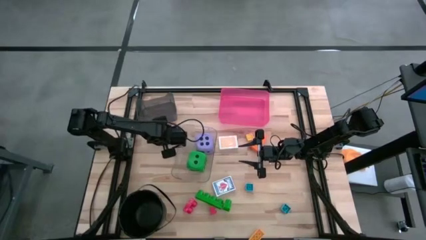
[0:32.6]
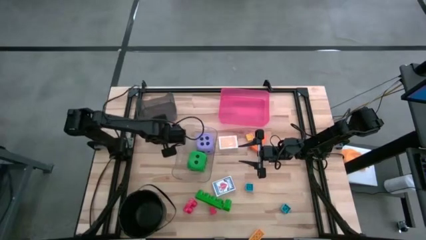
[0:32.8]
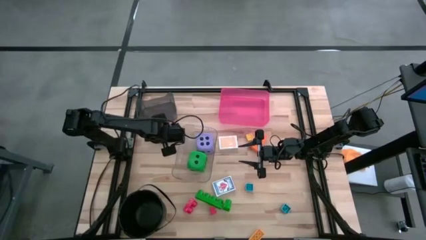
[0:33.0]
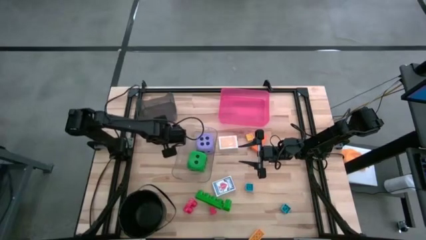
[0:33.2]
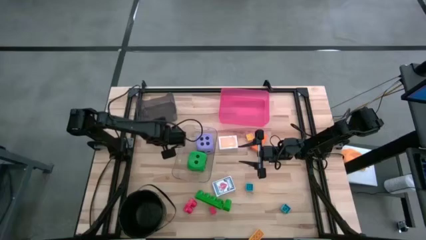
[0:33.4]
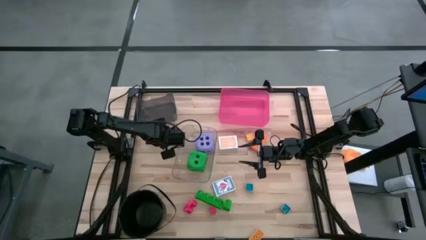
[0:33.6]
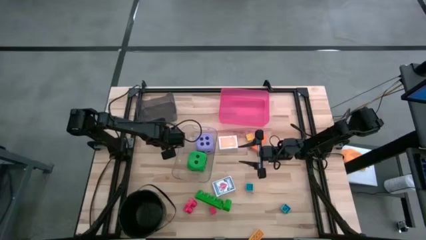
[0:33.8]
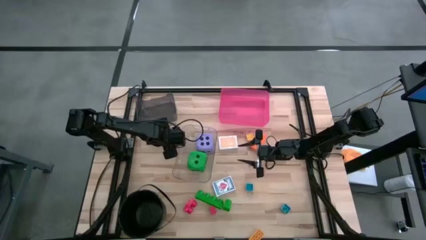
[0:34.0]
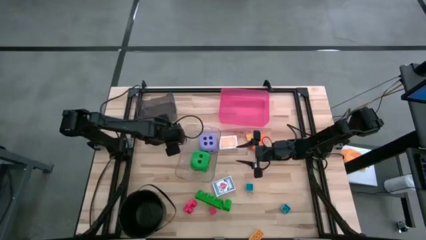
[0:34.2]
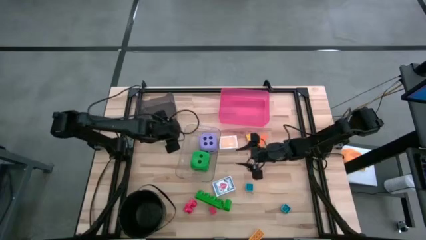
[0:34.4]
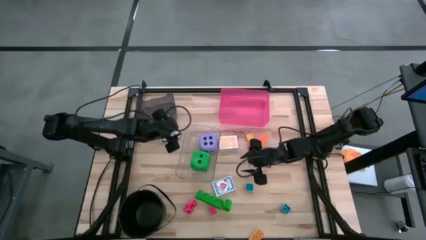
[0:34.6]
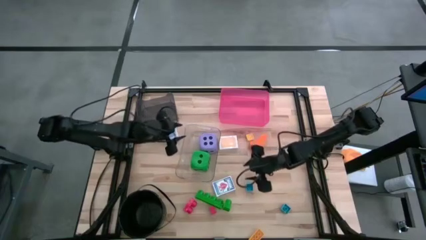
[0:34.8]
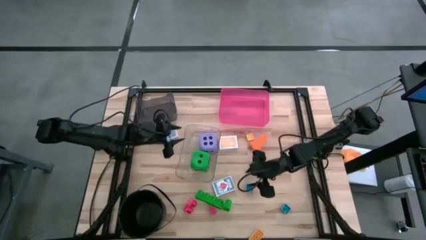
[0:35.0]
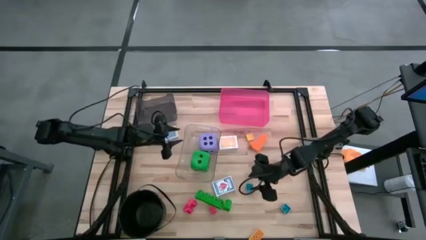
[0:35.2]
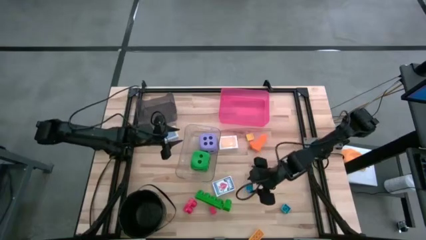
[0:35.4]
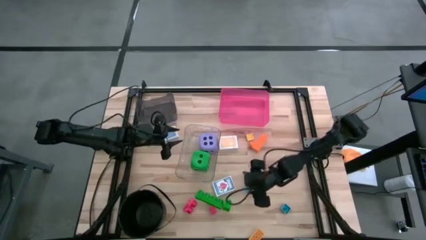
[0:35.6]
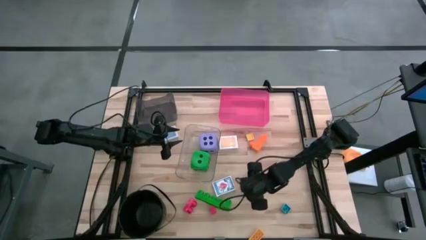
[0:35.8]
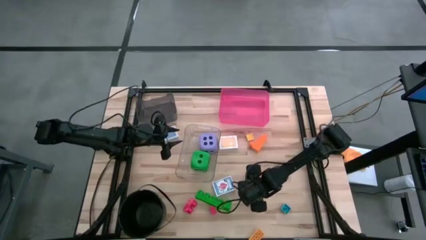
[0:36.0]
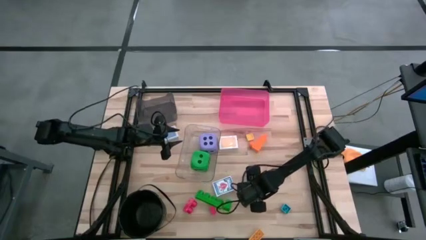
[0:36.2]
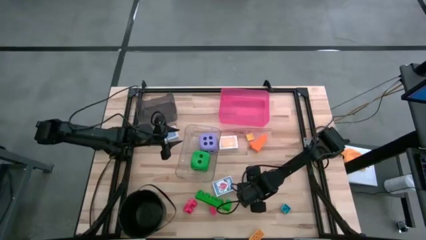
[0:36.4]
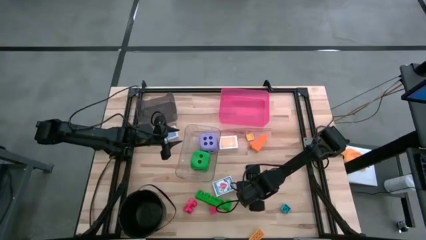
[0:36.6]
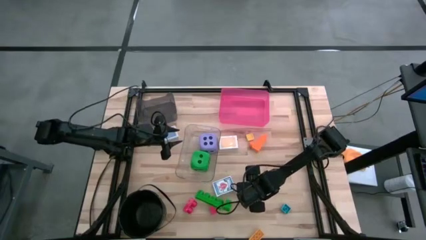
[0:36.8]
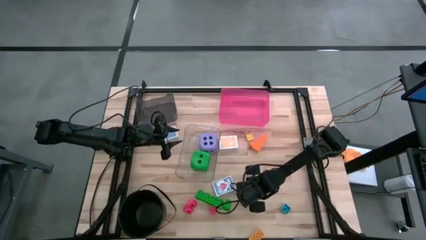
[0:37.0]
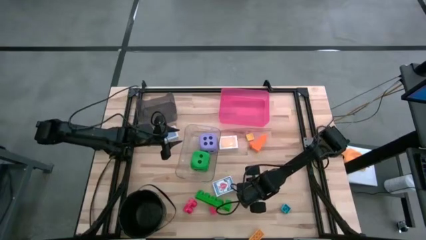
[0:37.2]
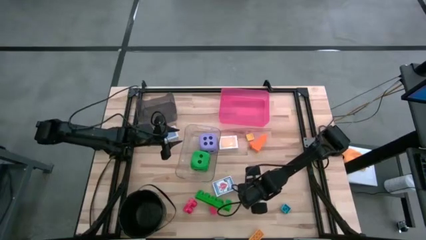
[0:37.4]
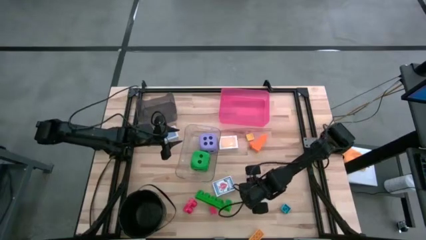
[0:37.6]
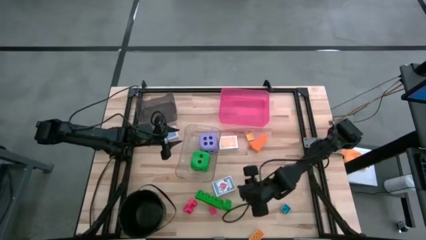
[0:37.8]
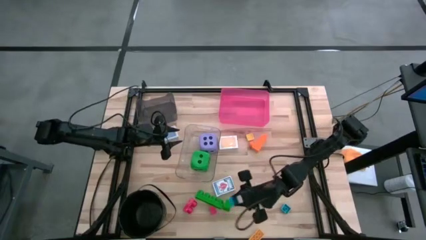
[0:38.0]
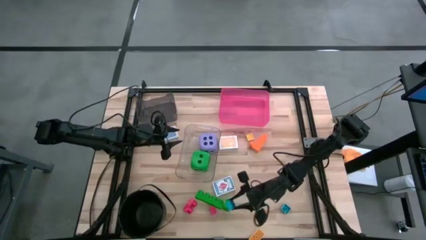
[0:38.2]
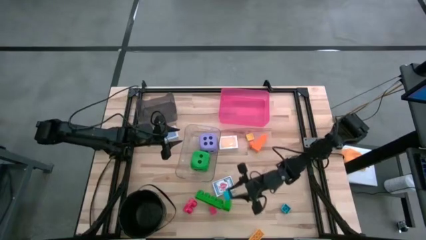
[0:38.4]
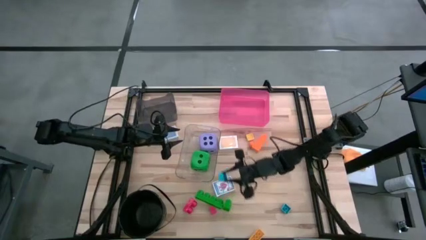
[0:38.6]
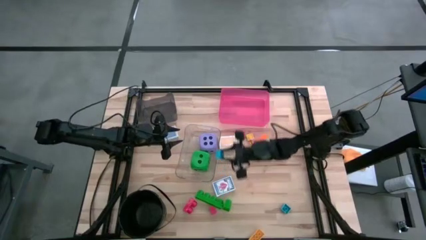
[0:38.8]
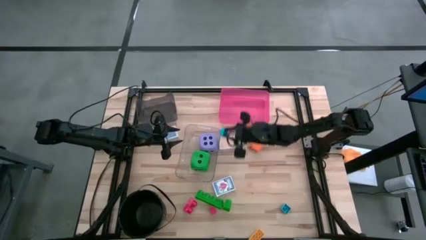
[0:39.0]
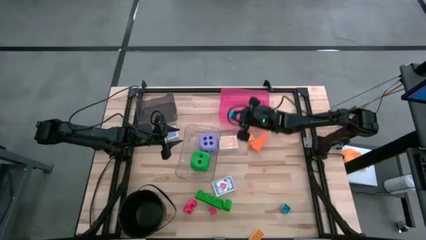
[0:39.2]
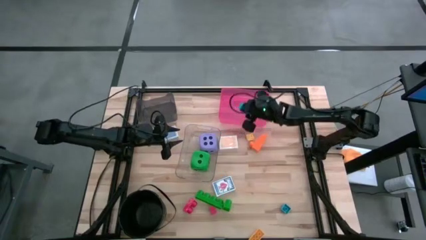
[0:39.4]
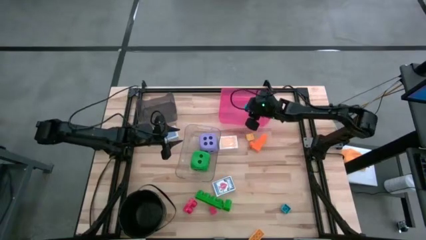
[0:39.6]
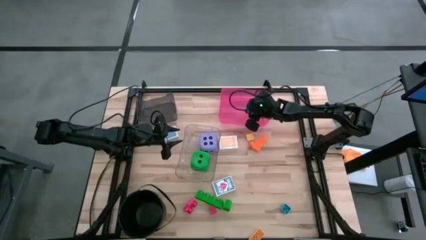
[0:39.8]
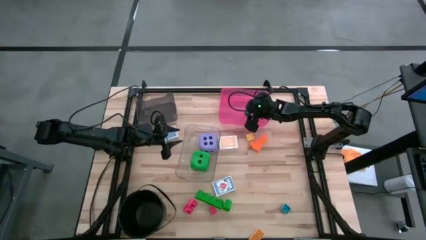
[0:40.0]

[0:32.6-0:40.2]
Task: Pick & Place Toys
Put the left blue game piece into the pink bin

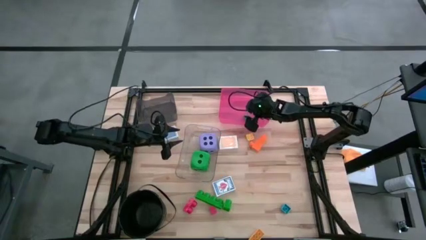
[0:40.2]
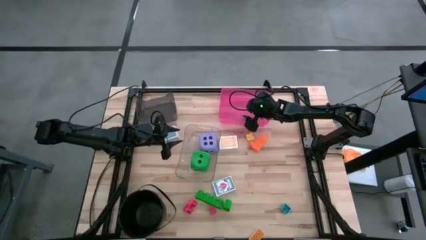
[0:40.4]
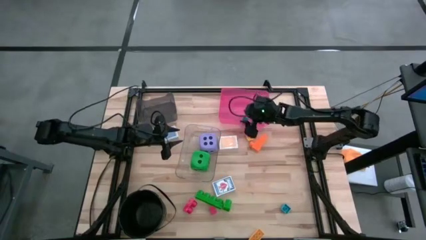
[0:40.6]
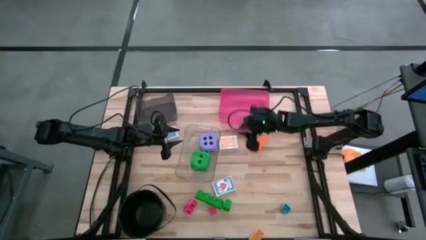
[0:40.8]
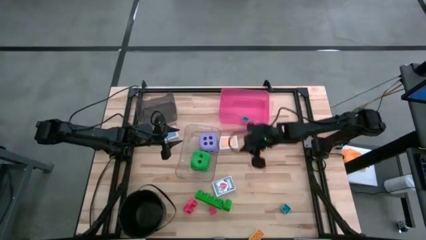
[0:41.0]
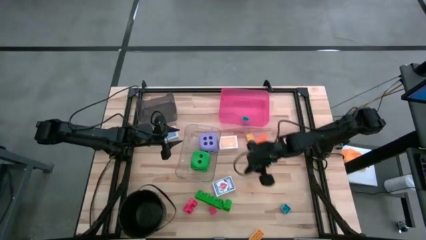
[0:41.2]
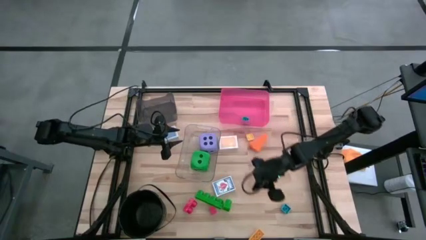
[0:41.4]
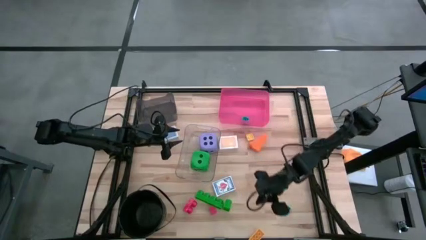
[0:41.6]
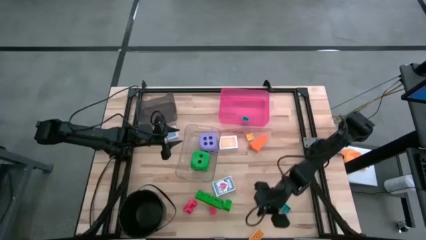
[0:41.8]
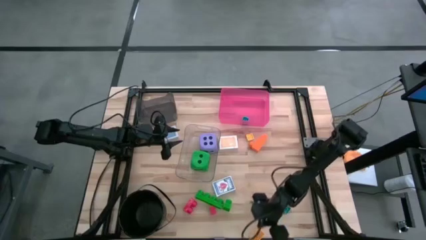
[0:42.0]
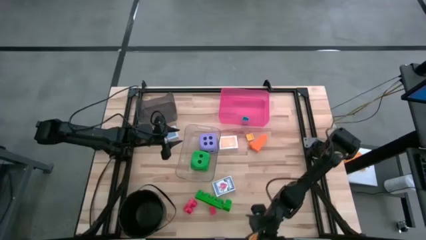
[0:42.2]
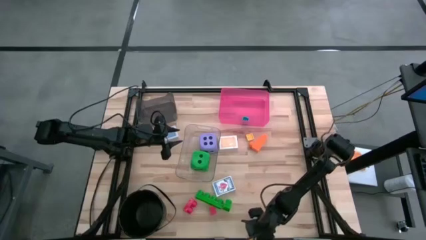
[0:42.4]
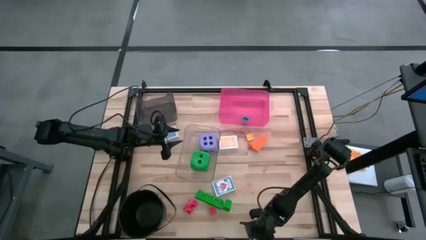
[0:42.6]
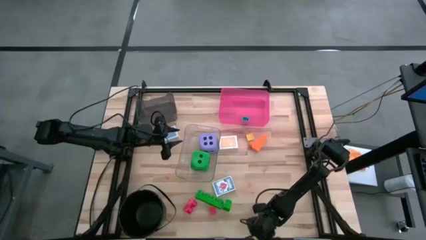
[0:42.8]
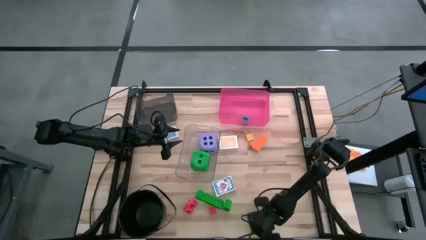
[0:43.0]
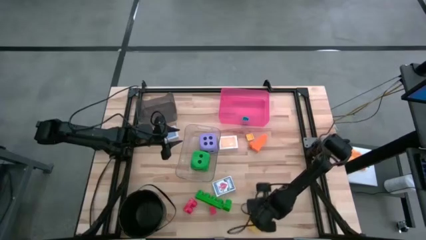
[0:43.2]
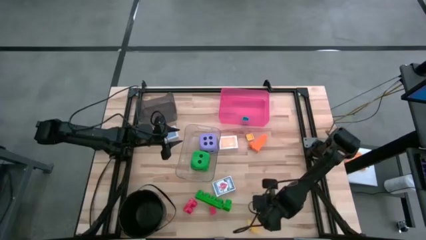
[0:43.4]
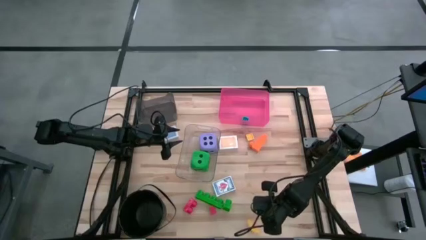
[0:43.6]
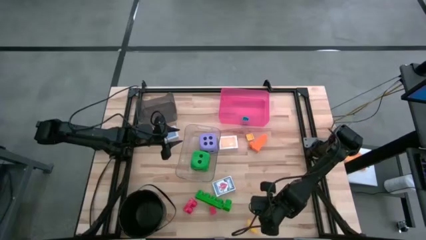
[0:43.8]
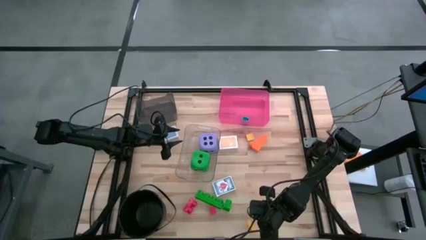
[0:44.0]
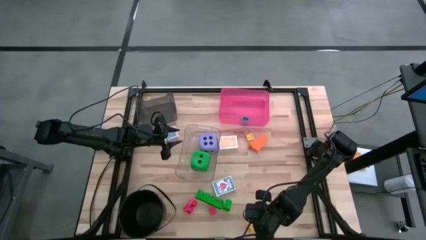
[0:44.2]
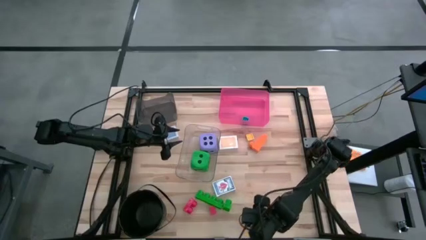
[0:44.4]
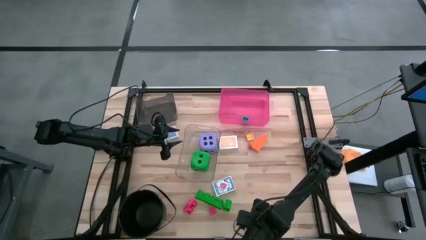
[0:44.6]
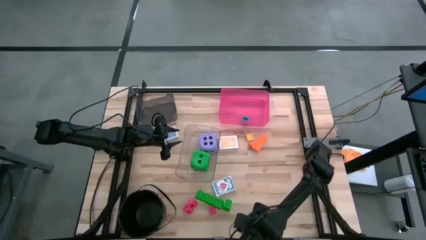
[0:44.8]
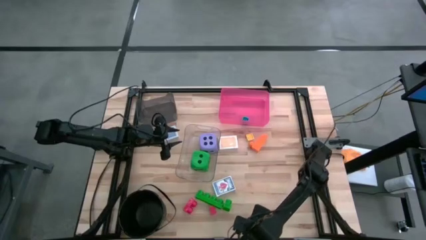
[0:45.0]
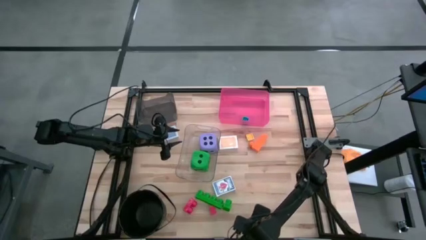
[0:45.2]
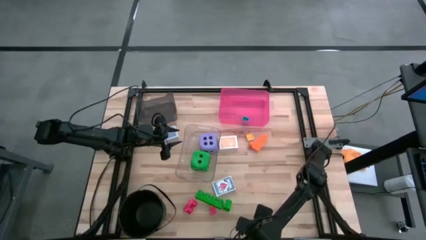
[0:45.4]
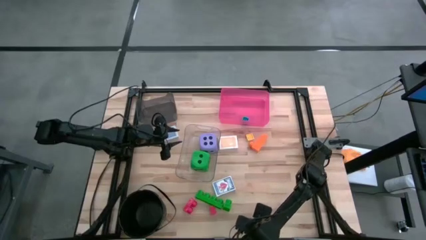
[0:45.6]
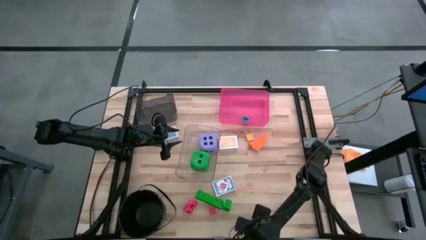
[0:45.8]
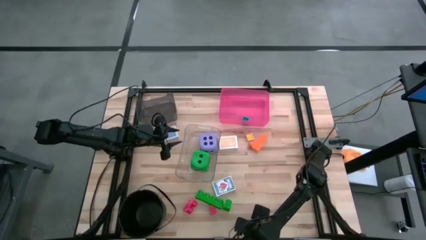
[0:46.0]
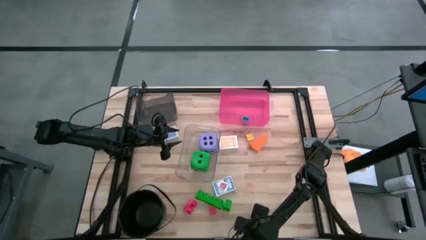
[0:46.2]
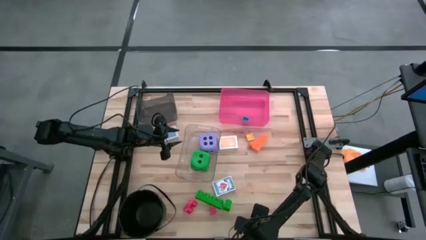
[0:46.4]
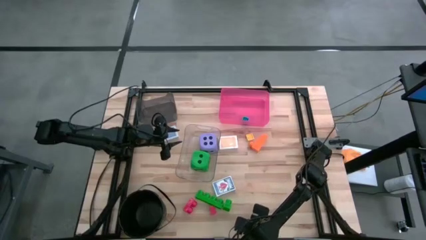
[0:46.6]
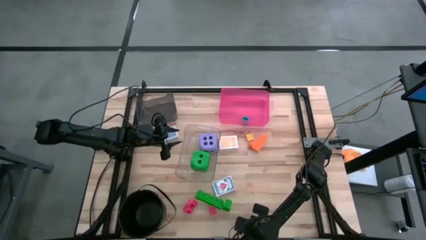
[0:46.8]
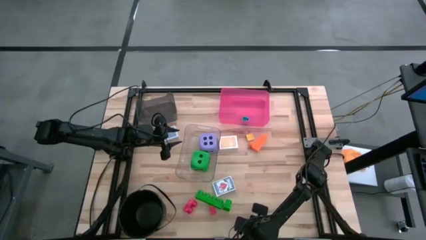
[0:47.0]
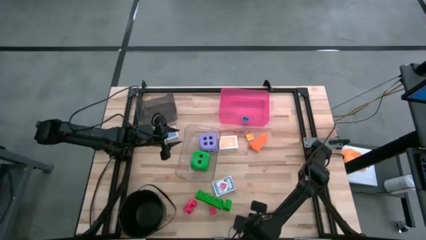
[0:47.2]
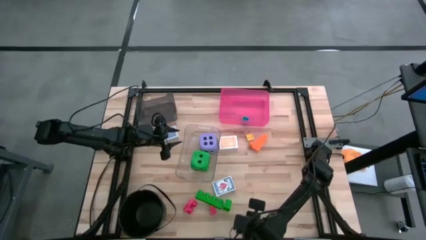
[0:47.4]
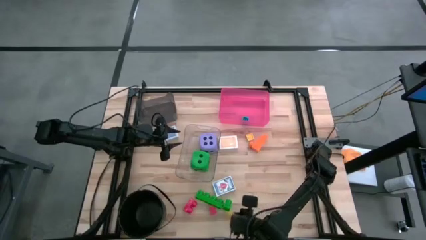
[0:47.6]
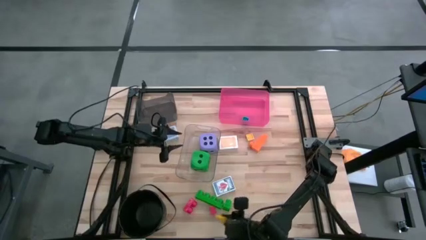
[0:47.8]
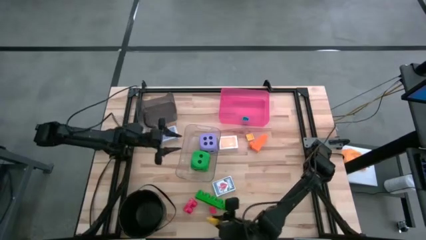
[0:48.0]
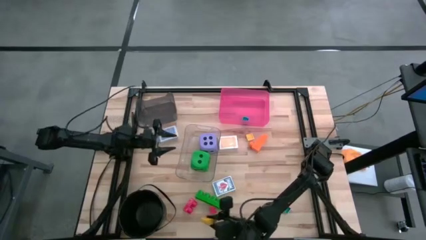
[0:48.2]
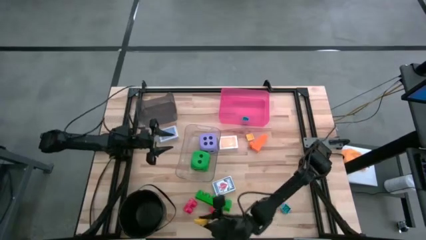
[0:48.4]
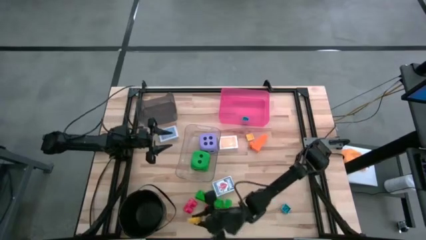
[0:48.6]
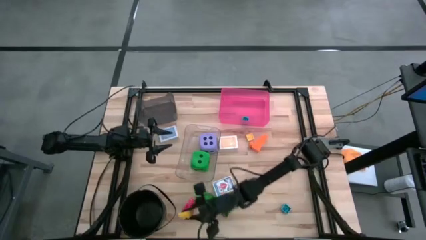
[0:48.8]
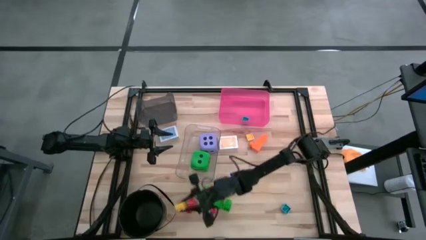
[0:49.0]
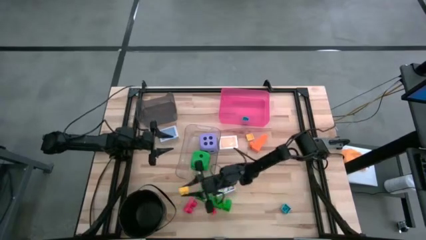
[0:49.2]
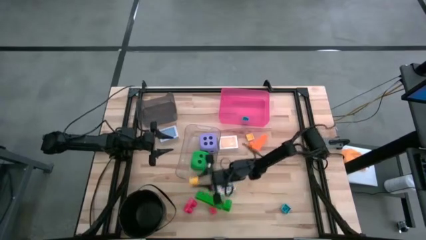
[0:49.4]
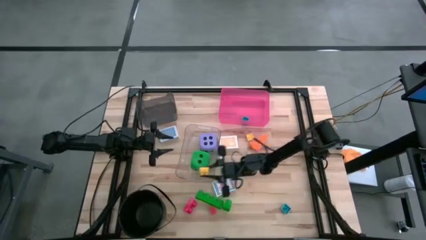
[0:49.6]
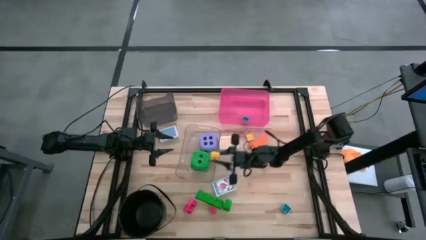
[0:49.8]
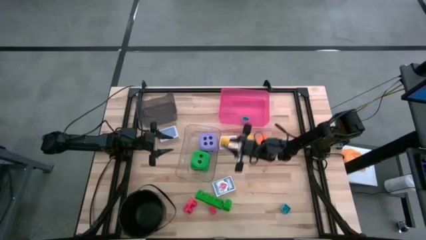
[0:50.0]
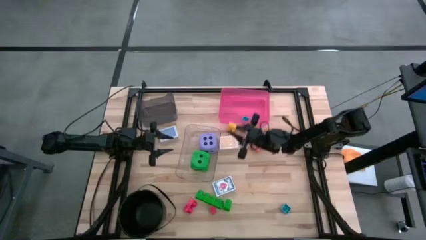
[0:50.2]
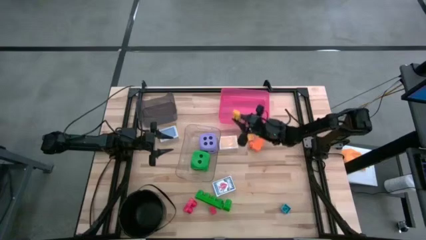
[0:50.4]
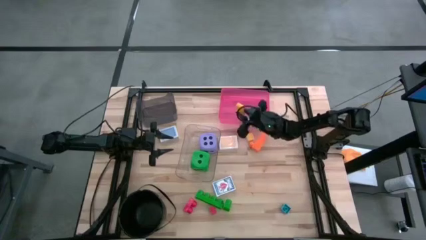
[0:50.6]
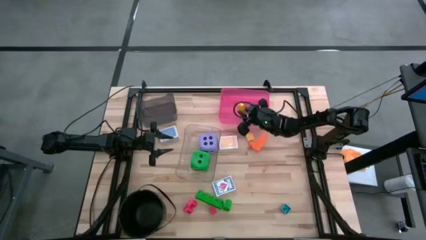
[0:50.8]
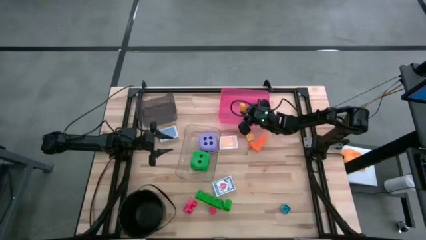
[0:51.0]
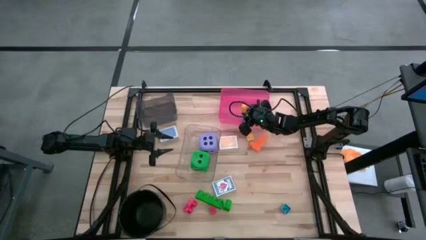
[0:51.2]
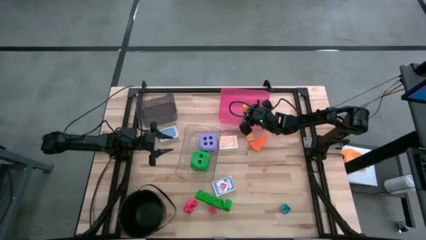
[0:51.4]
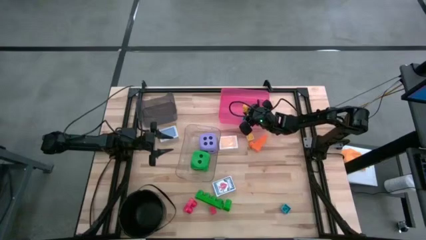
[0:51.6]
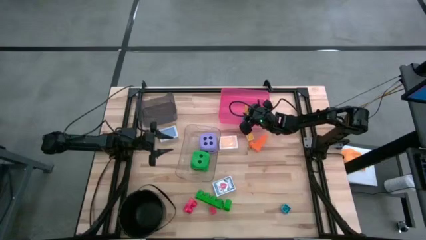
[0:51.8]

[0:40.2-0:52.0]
Put the bottom yellow game piece into the pink bin
